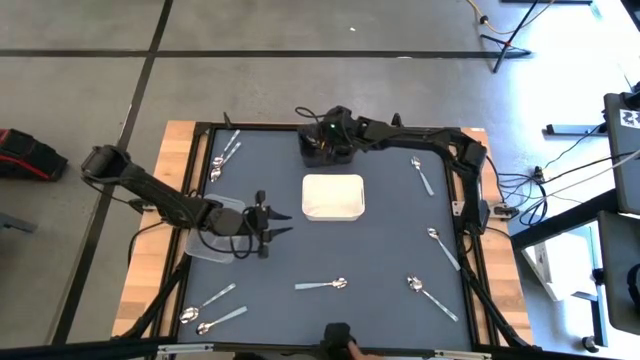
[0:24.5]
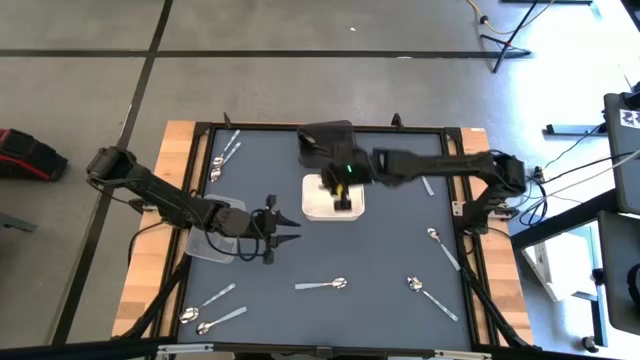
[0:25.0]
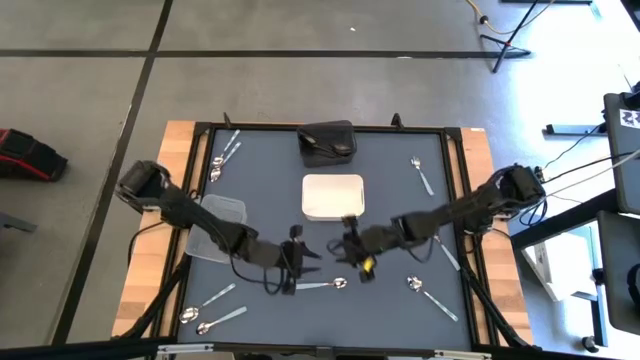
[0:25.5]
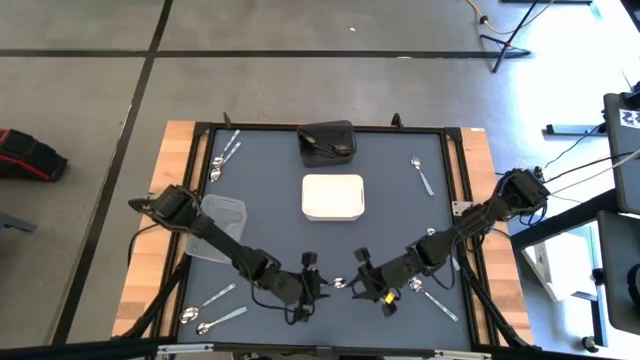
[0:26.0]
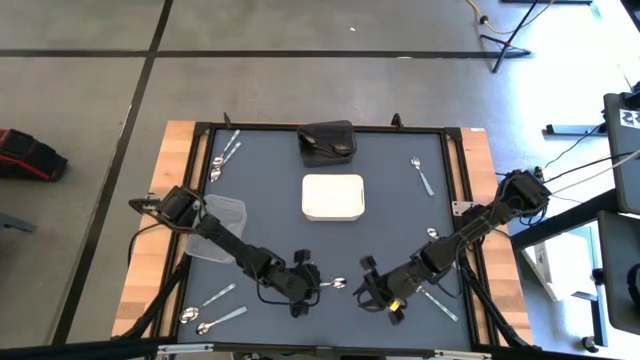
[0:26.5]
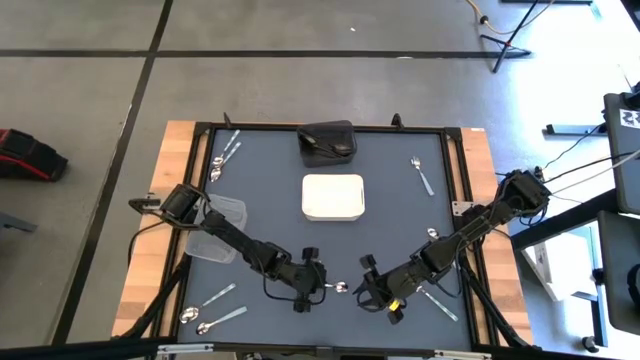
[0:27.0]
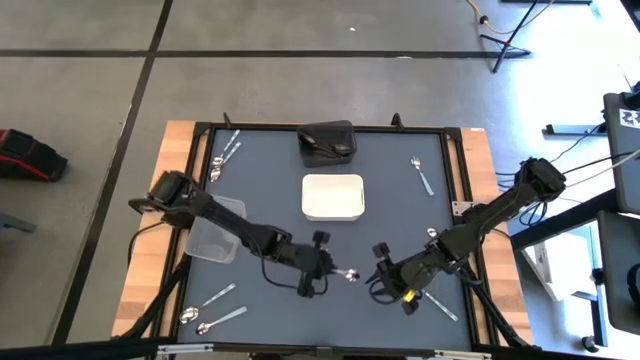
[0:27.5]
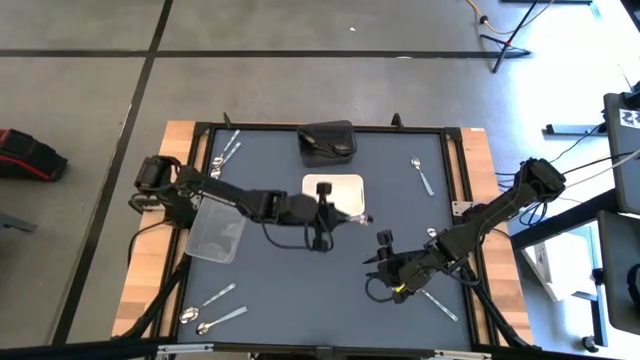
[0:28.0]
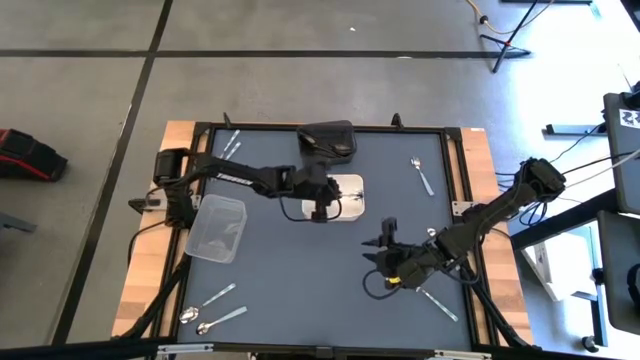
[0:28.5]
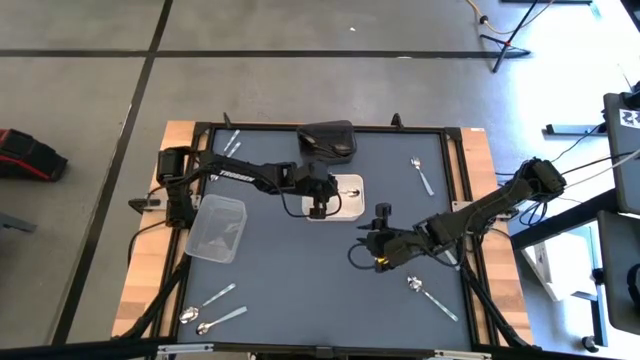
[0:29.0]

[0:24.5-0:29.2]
Task: Sort silverware by color (type)
Put the blue spoon into the white bin

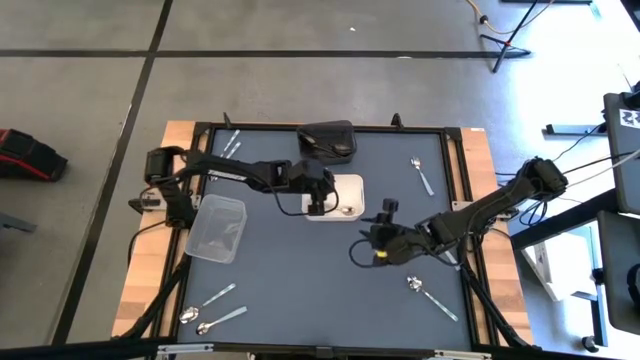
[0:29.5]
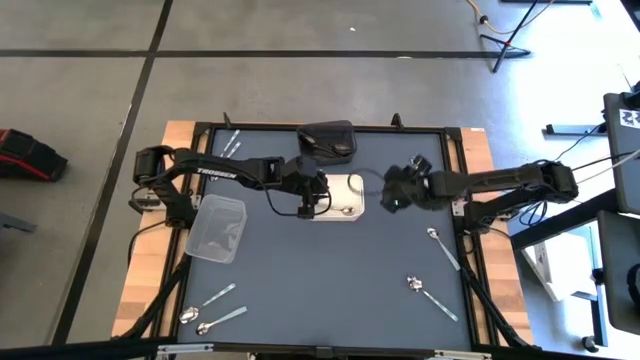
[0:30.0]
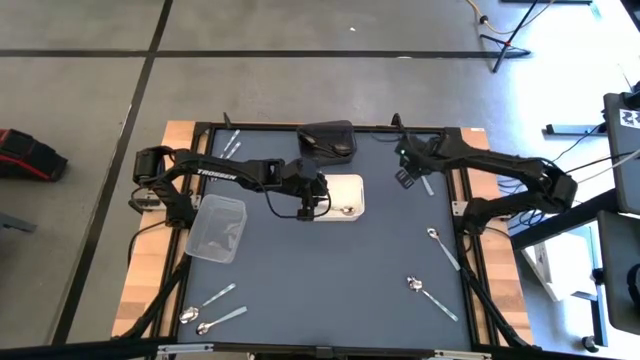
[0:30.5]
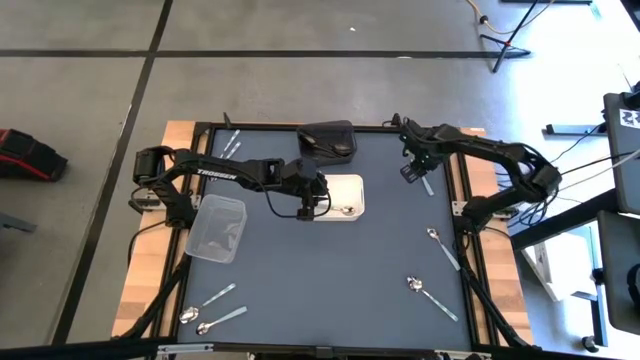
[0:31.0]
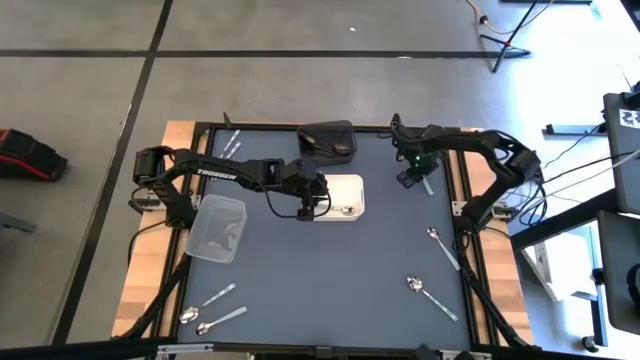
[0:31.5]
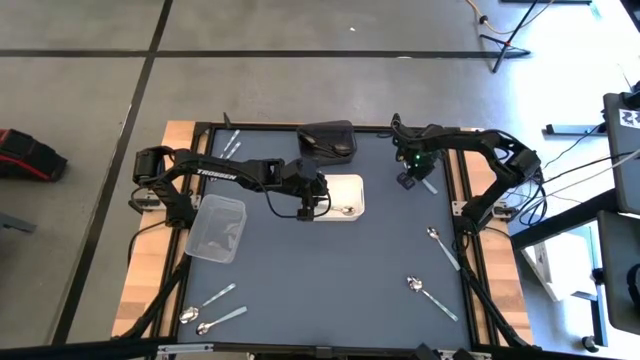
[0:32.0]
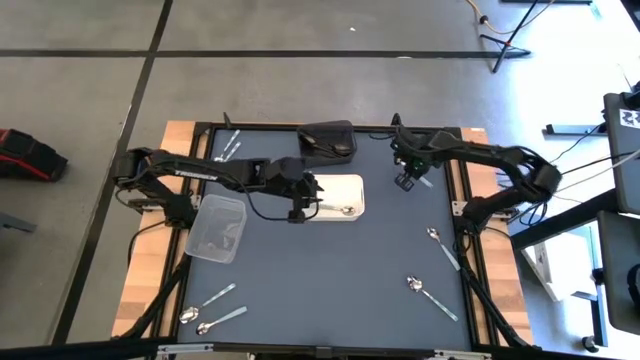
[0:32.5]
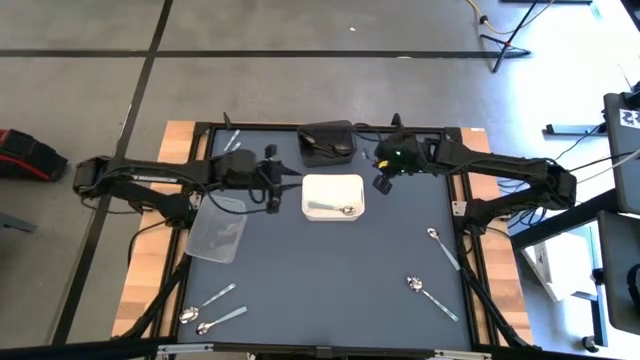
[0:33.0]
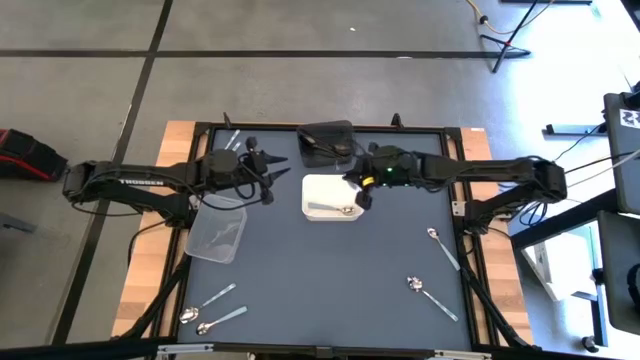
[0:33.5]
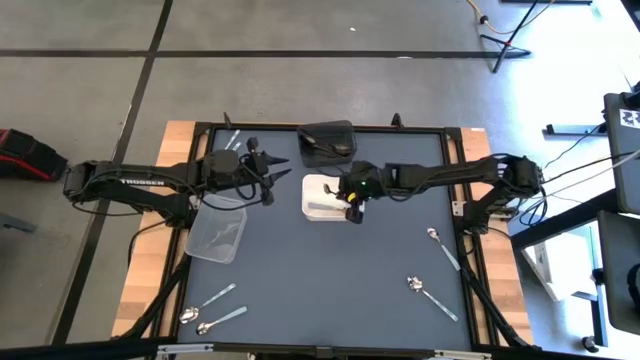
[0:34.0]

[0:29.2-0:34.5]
Put the blue spoon into the white bin

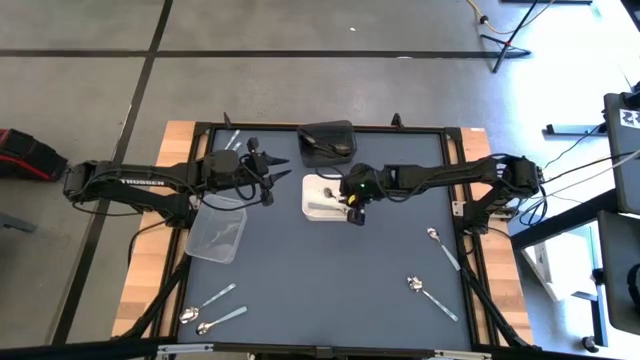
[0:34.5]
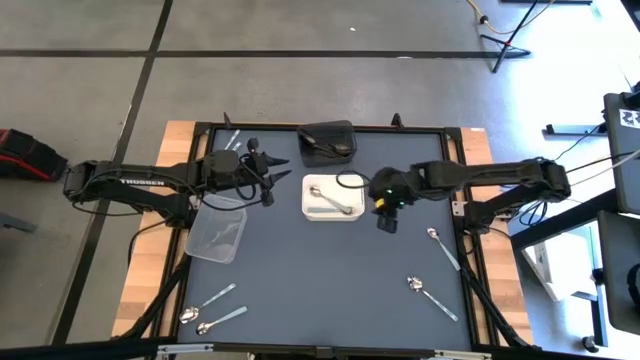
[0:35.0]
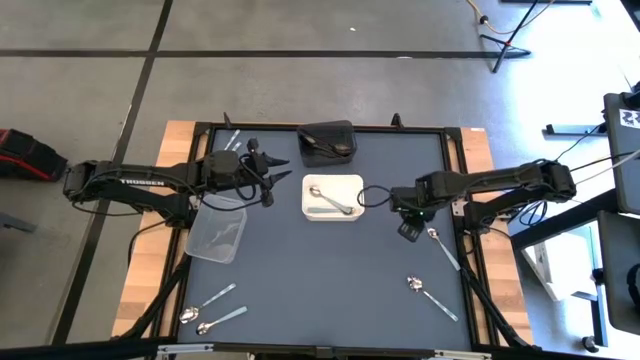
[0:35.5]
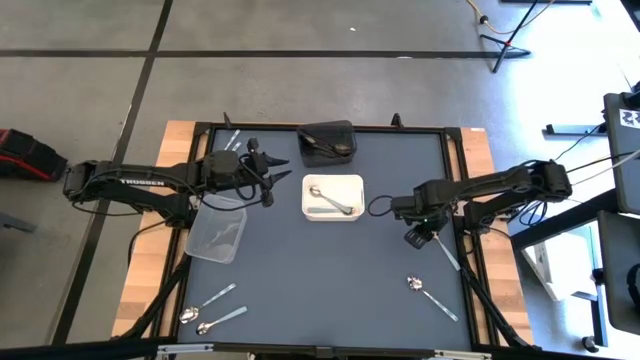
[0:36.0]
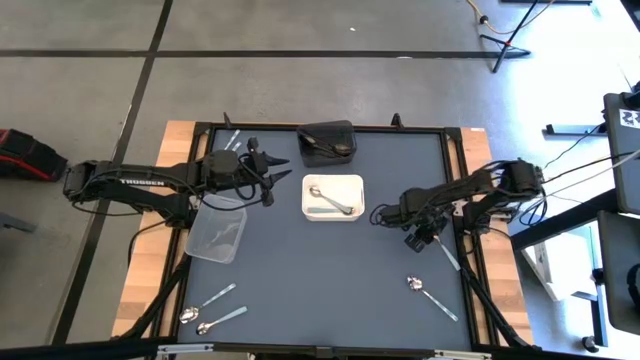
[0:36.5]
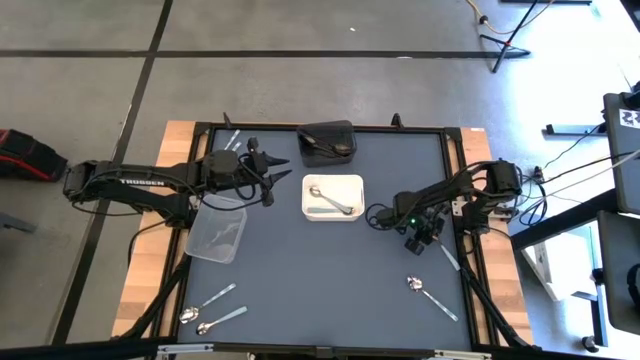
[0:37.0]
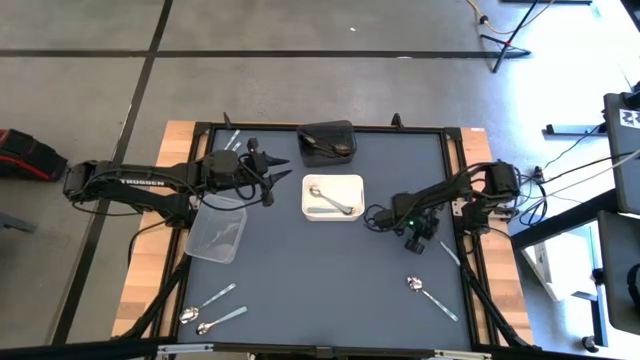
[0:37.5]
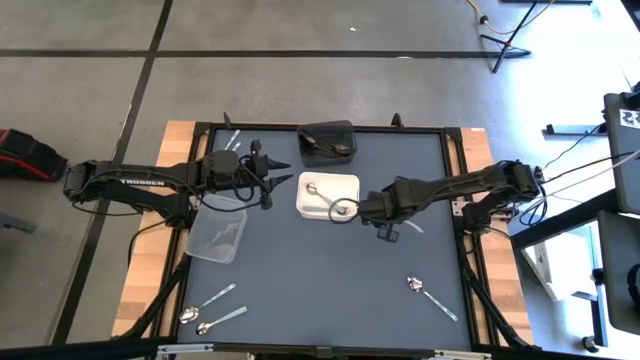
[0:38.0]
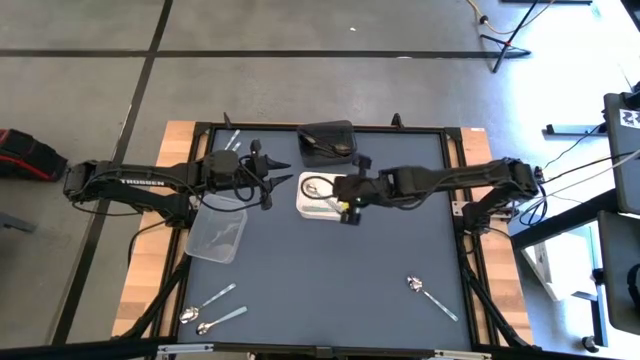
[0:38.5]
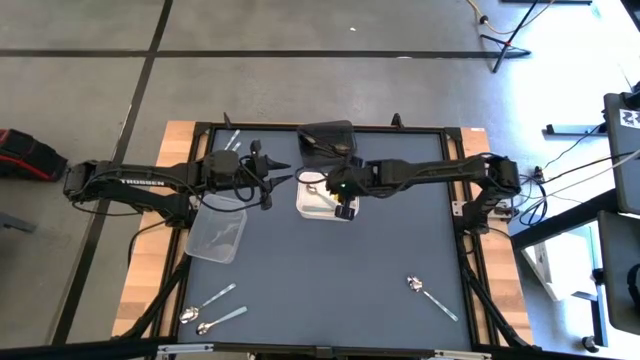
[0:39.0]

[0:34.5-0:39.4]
Put the blue spoon into the white bin

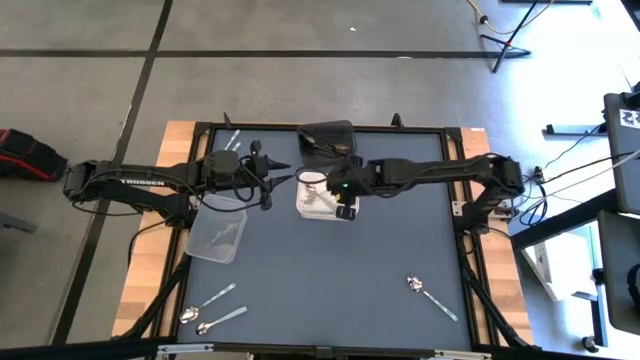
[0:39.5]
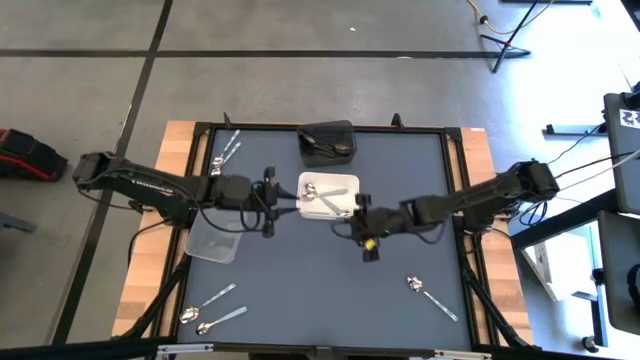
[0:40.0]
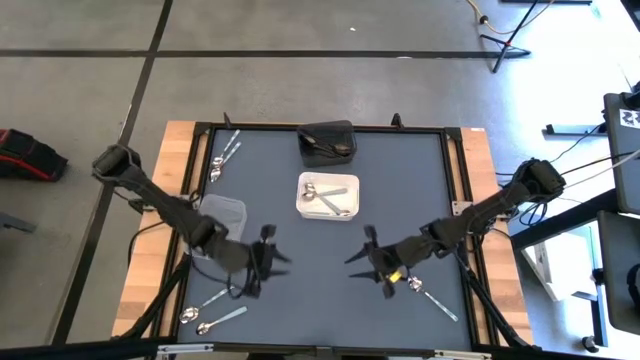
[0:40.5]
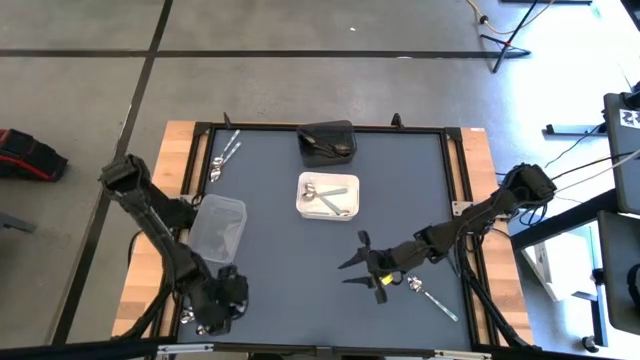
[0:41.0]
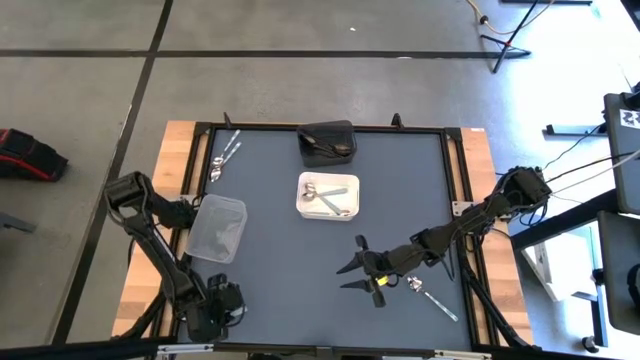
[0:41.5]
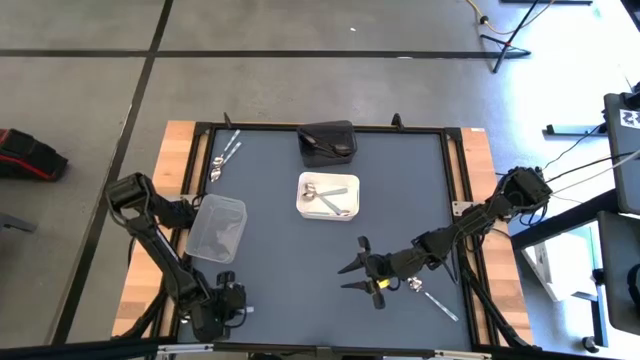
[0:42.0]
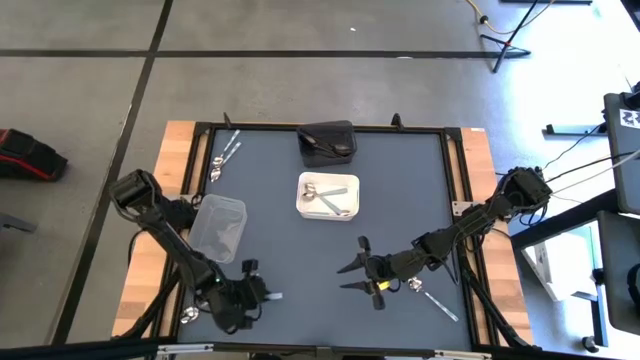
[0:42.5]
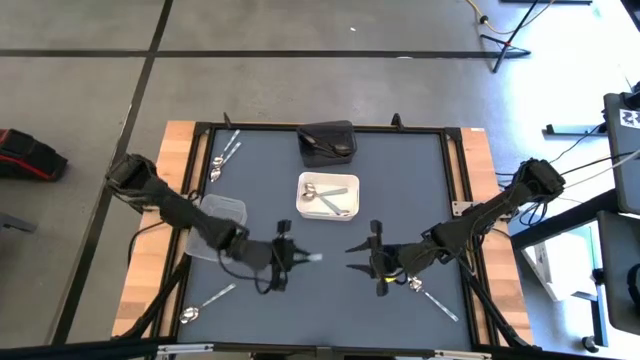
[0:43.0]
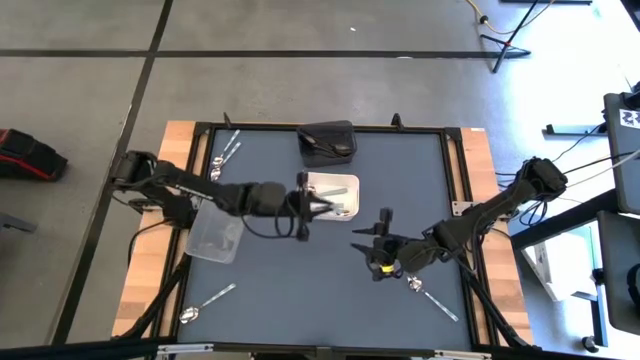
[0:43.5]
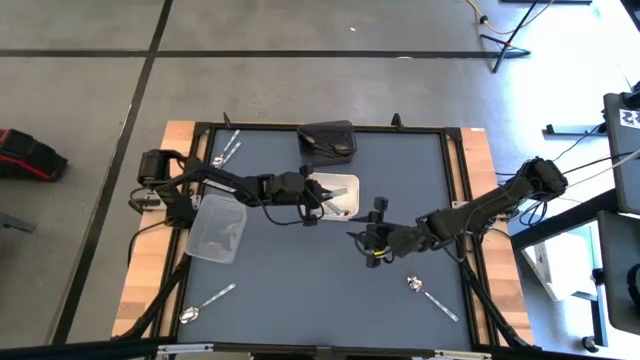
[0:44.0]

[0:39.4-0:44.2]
Put the blue spoon into the white bin

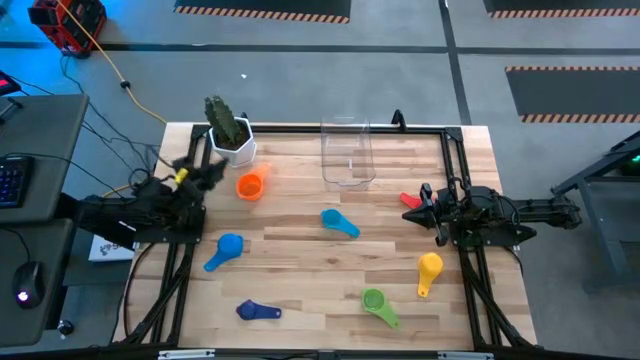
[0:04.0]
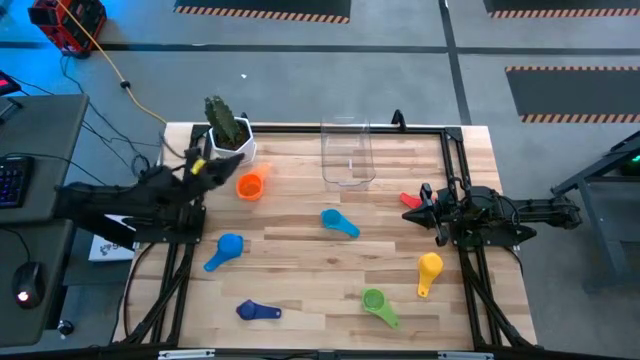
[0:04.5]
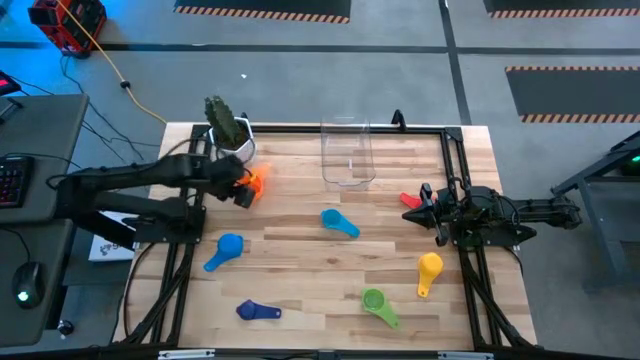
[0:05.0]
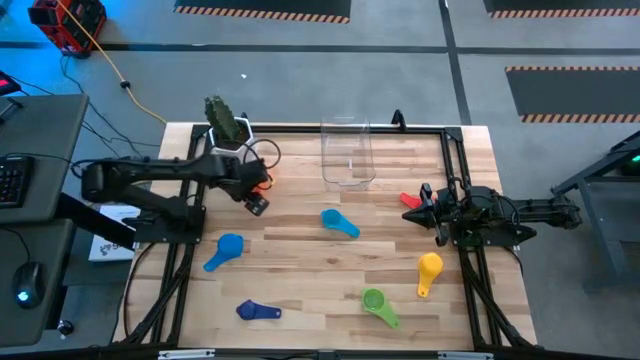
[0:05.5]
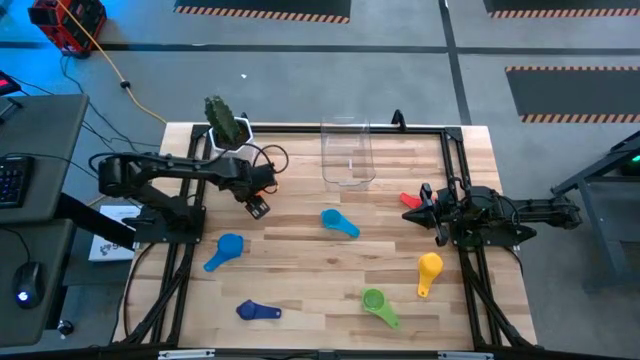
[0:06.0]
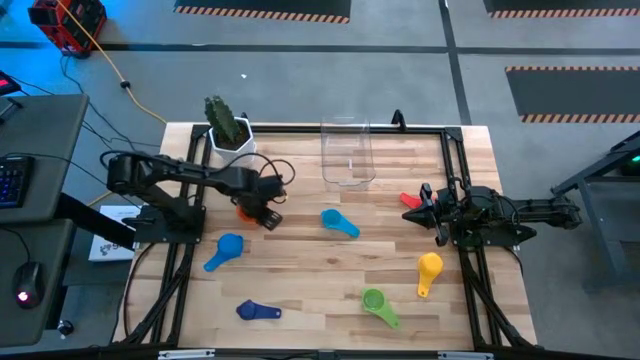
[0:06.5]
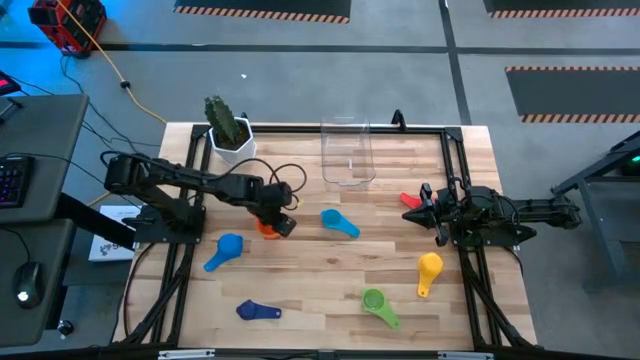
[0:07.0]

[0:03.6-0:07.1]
Task: Nest measuring cups in basket
Prepare the orange measuring cup
